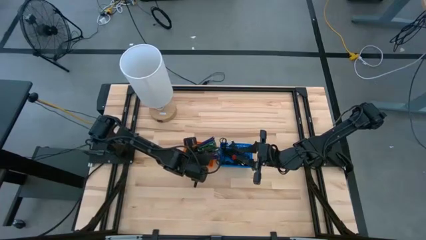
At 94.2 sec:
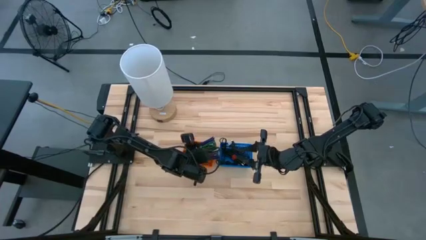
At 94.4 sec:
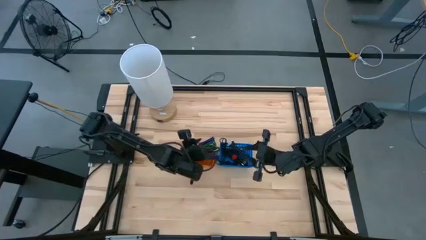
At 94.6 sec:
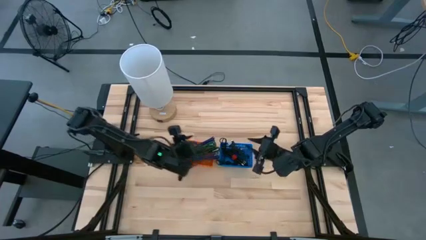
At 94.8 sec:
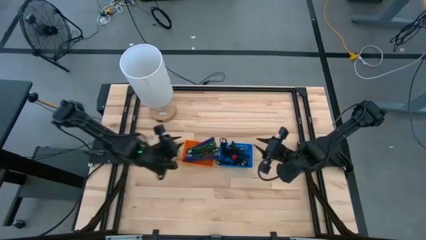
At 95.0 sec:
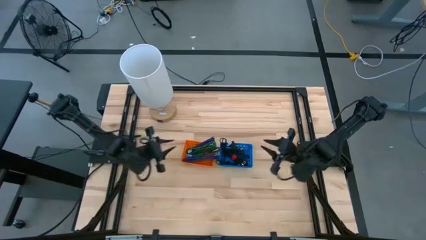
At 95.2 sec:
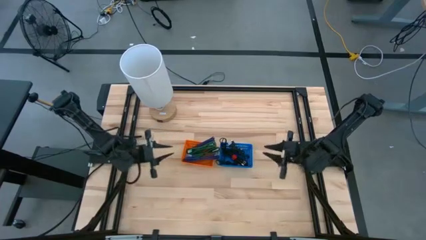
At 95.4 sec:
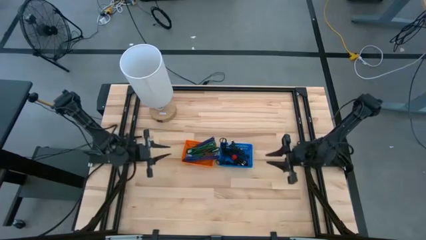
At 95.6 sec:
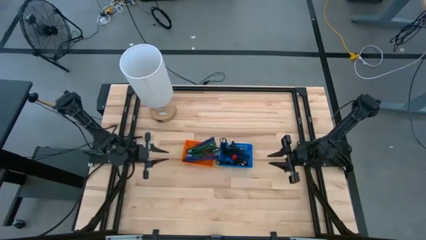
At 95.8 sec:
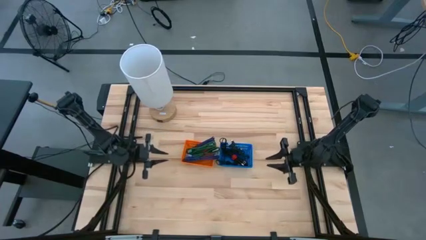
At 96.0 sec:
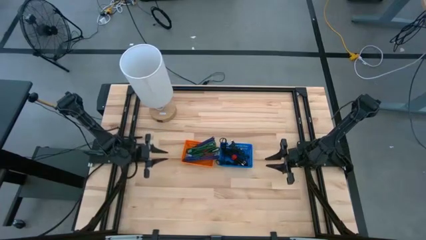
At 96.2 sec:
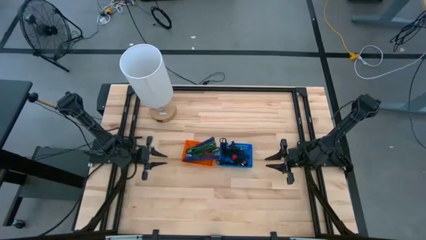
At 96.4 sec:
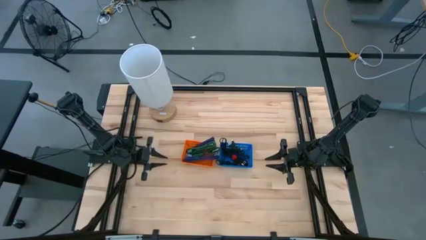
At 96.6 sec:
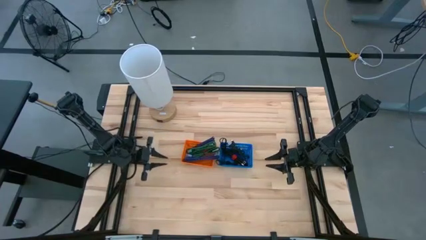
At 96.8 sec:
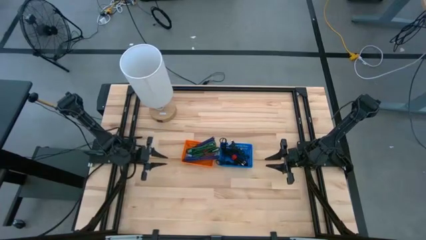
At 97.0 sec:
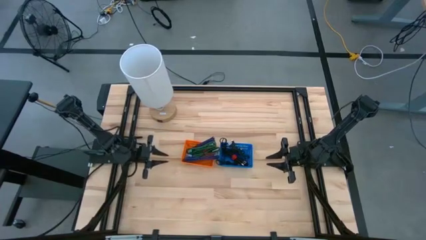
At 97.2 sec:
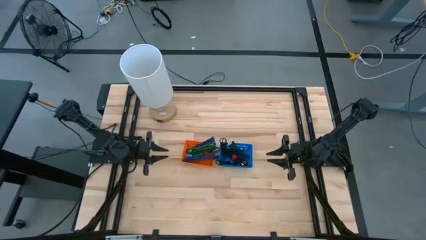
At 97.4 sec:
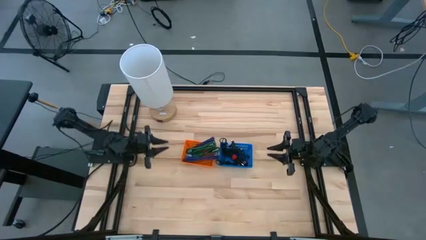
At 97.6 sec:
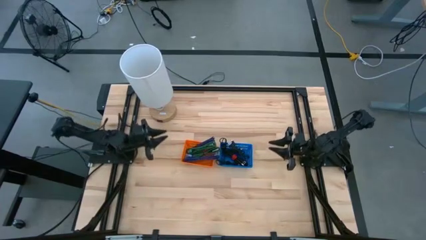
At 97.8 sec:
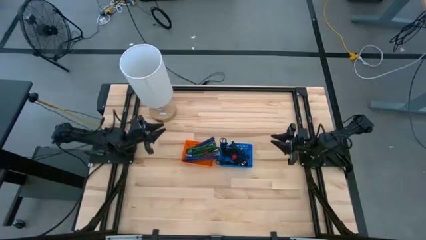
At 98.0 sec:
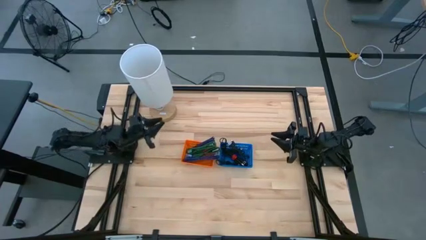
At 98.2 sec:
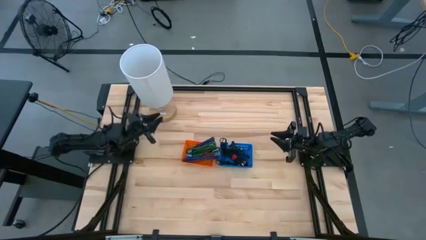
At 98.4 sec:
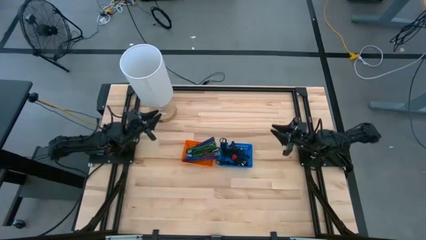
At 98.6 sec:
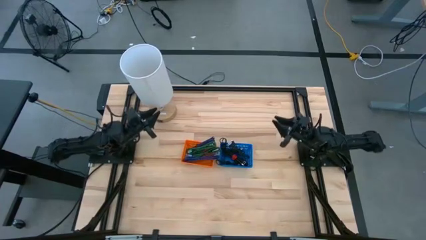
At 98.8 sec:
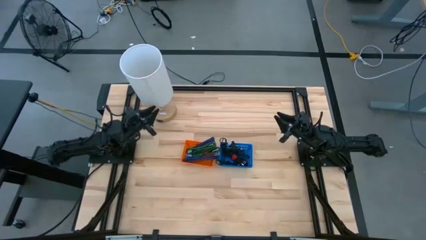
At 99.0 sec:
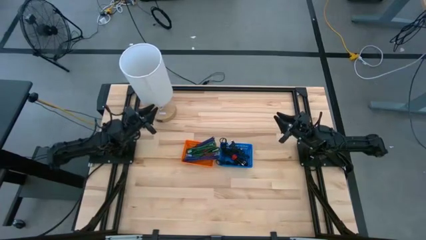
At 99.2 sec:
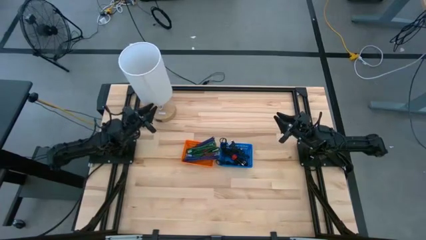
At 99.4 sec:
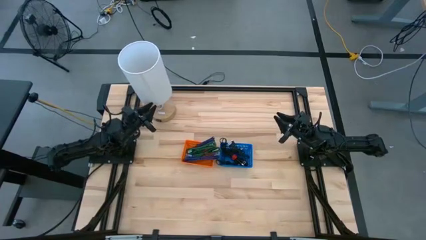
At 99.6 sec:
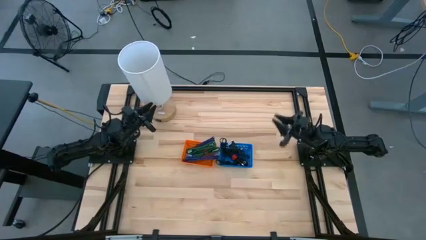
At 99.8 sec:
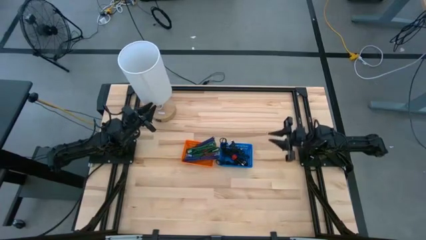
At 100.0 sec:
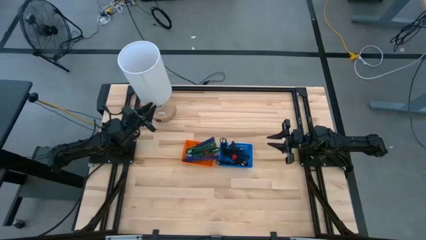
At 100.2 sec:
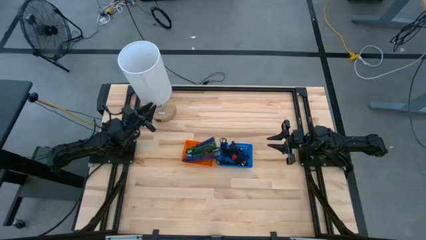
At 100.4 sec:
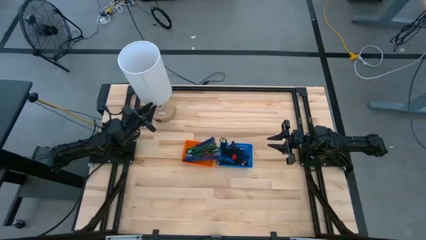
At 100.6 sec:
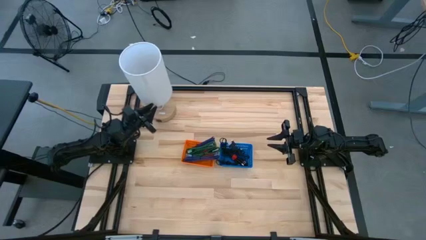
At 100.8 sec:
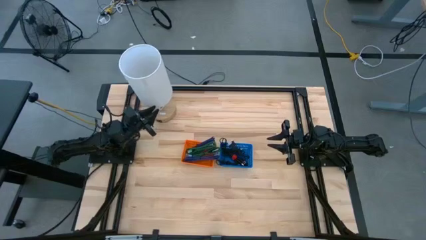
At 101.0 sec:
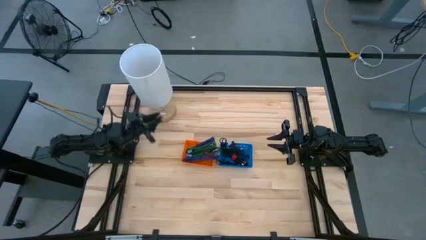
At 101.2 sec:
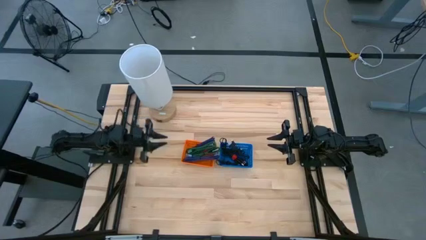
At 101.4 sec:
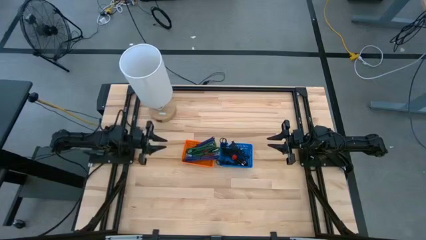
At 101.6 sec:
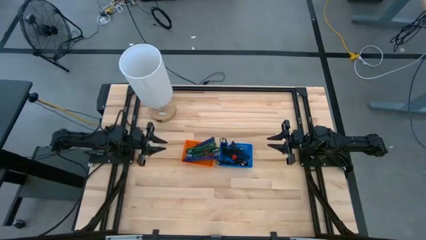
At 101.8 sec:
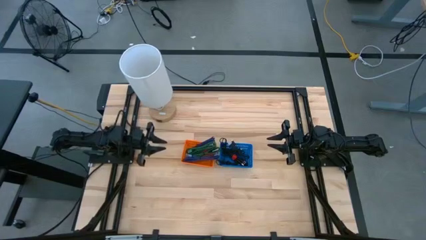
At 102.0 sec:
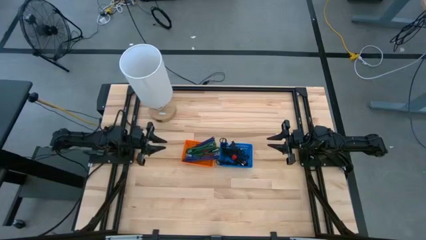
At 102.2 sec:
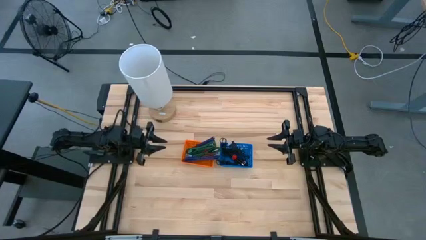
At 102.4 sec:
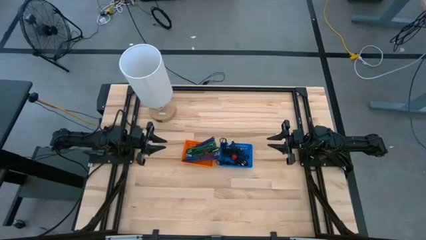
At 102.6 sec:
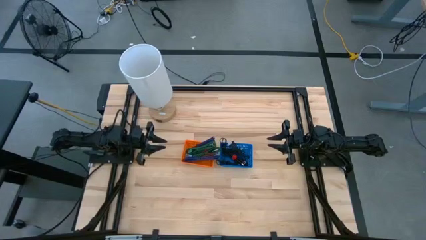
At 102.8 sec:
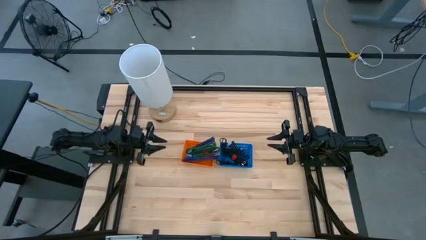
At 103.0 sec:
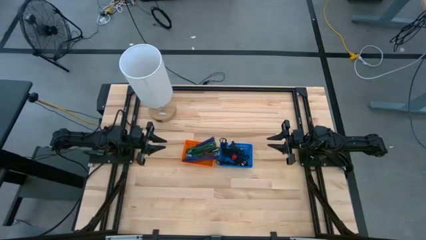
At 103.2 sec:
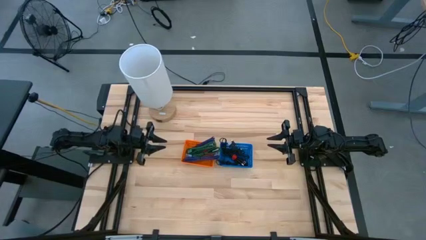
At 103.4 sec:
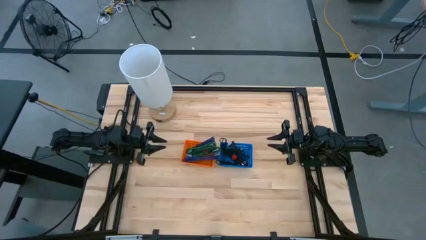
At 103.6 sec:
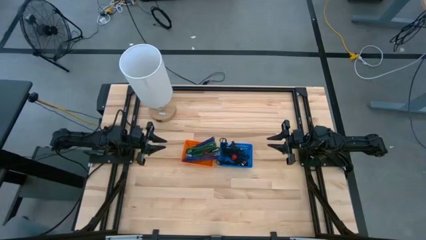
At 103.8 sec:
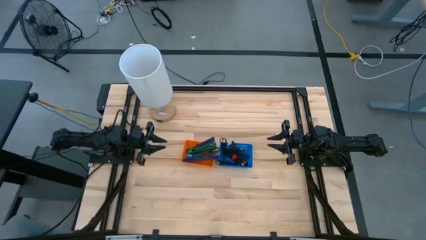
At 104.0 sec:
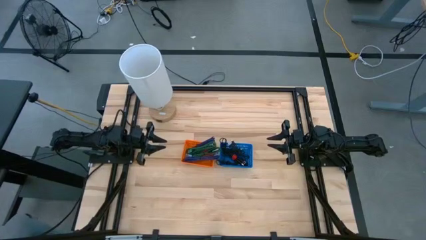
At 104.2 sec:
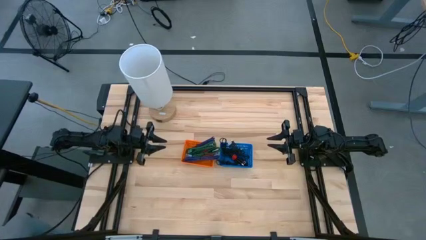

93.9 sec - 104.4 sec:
Task: Pick & Place USB Port
Return to Home Position
